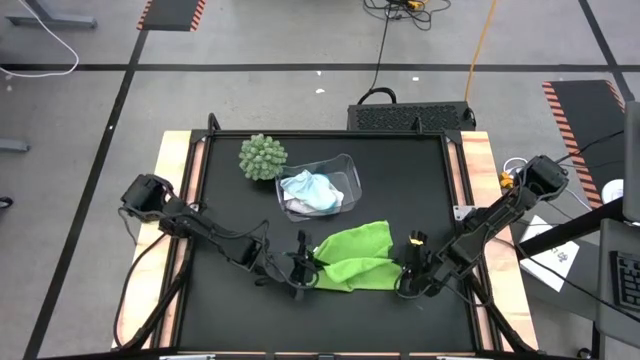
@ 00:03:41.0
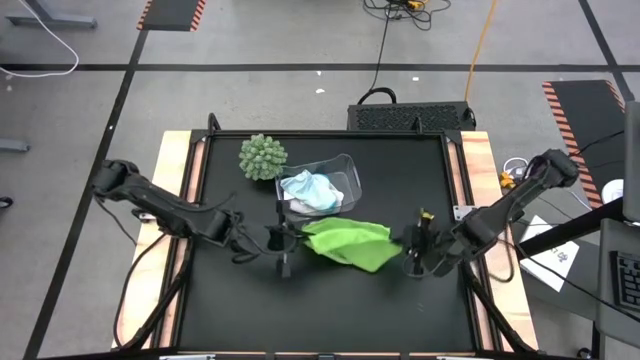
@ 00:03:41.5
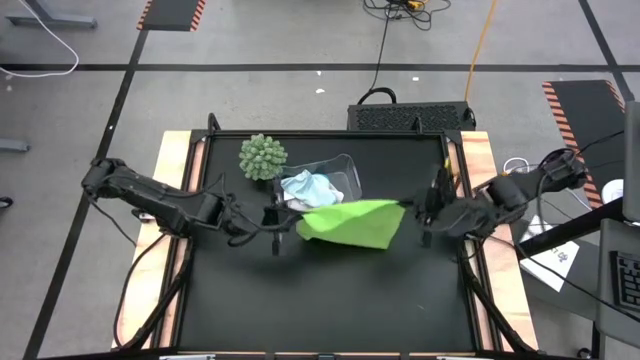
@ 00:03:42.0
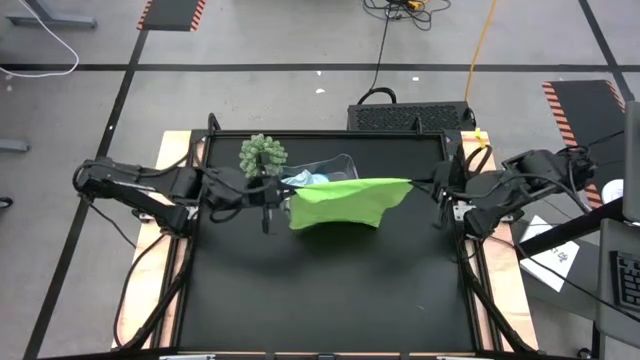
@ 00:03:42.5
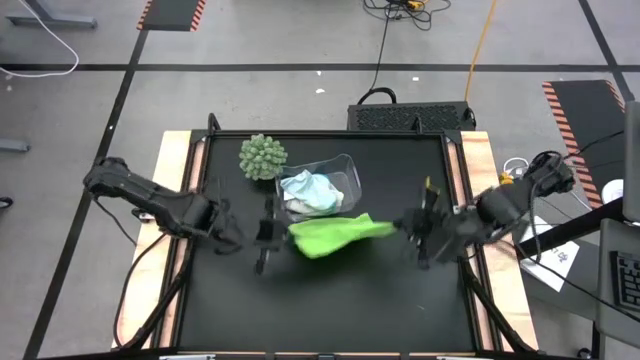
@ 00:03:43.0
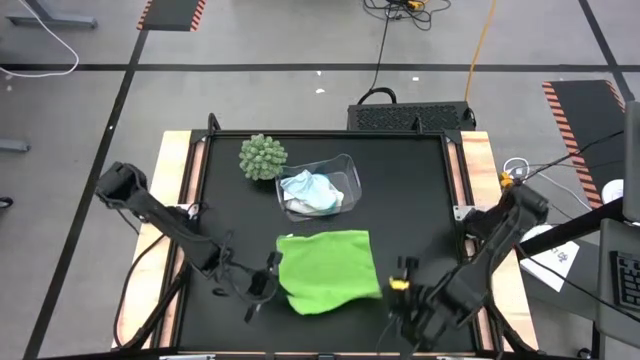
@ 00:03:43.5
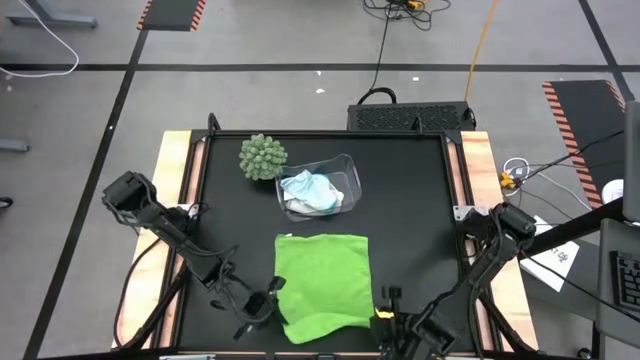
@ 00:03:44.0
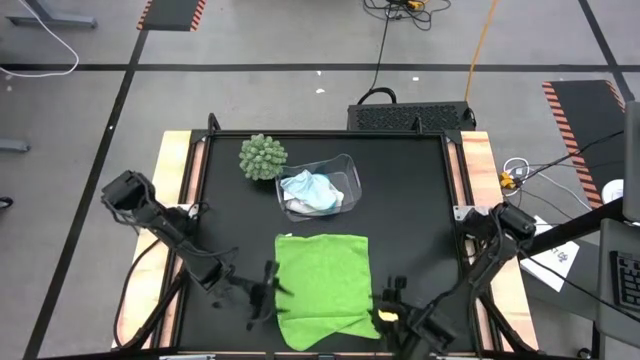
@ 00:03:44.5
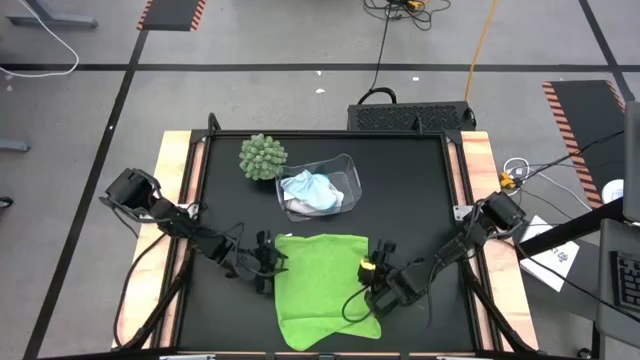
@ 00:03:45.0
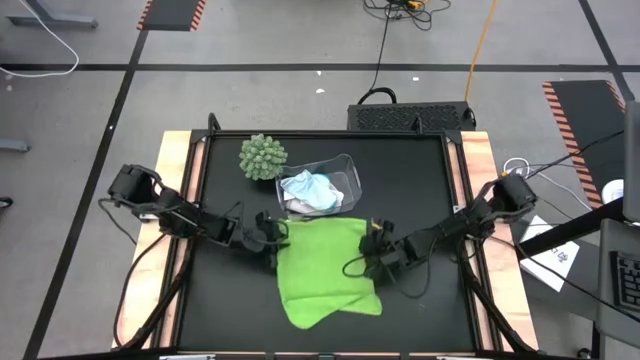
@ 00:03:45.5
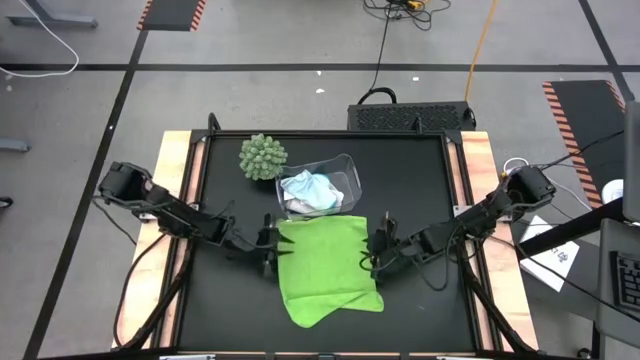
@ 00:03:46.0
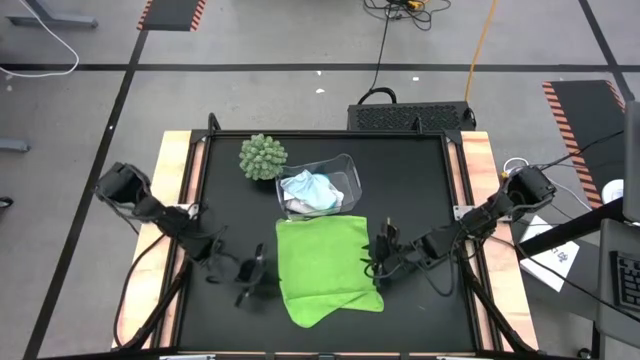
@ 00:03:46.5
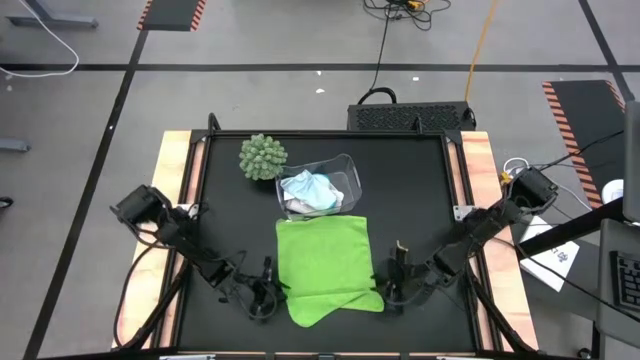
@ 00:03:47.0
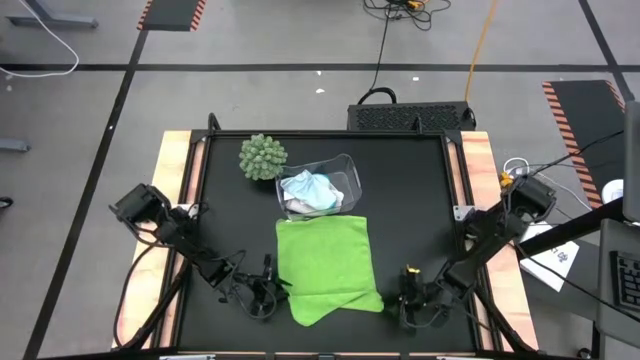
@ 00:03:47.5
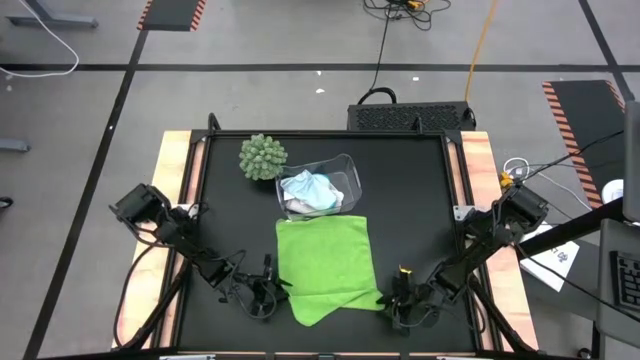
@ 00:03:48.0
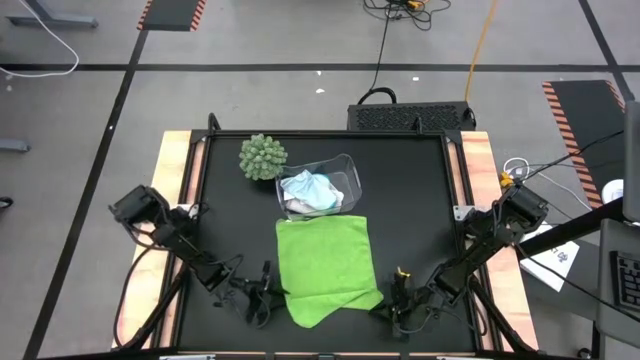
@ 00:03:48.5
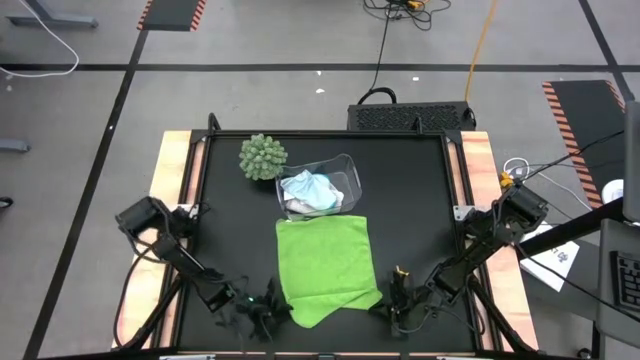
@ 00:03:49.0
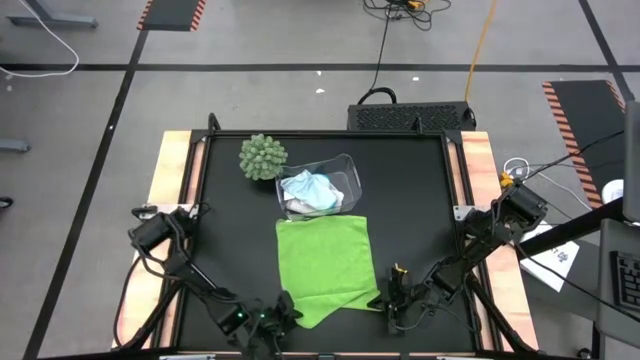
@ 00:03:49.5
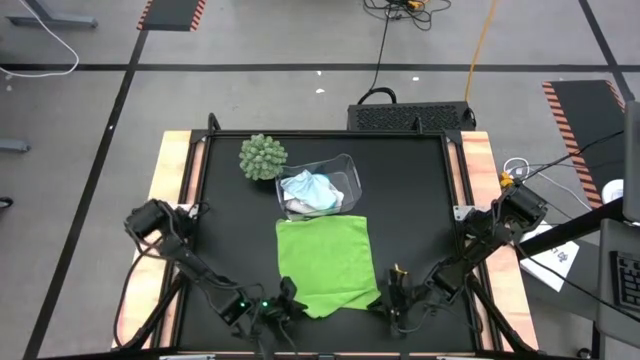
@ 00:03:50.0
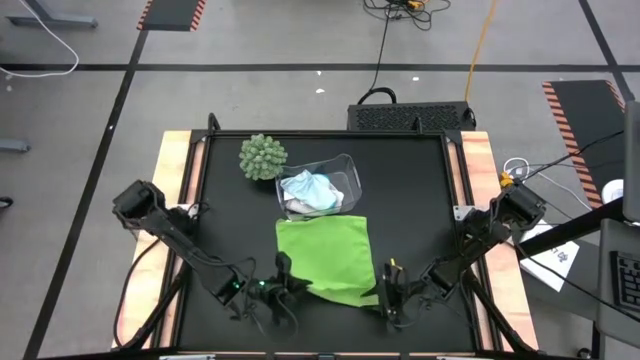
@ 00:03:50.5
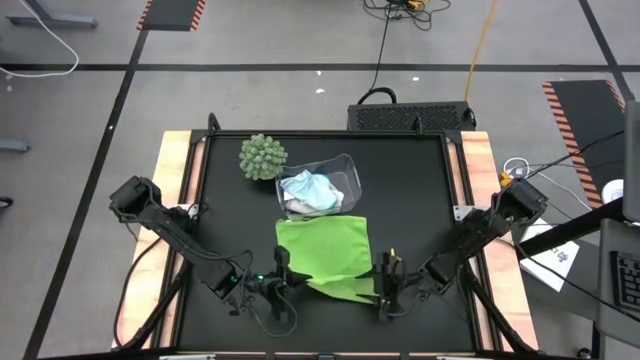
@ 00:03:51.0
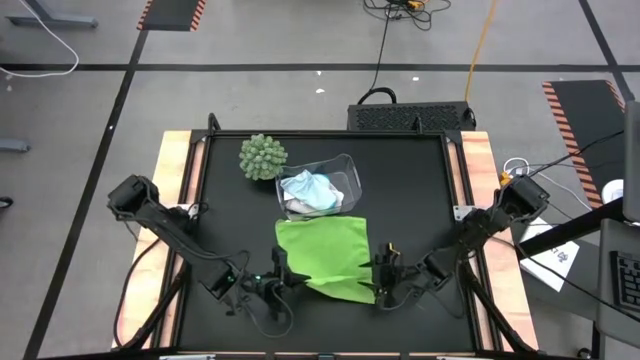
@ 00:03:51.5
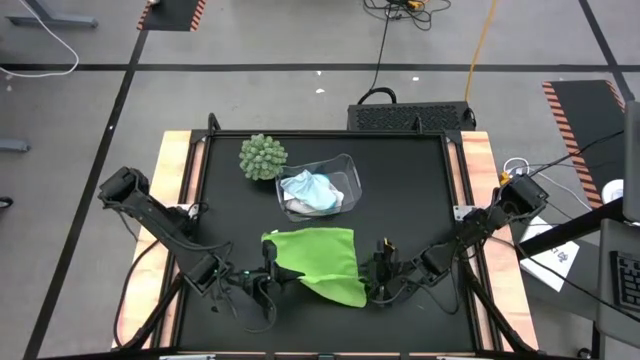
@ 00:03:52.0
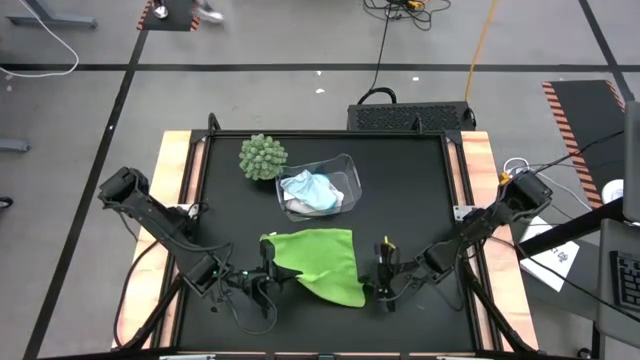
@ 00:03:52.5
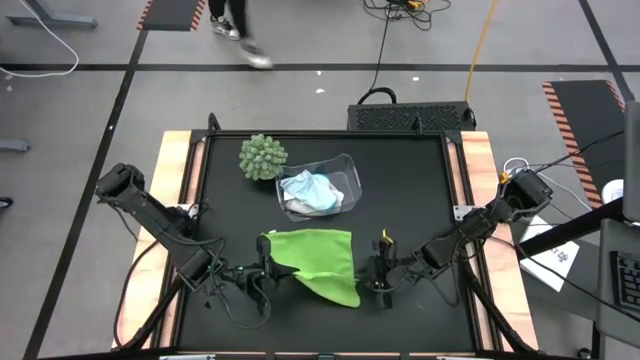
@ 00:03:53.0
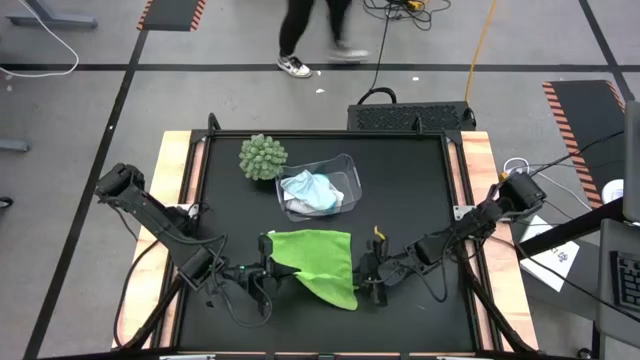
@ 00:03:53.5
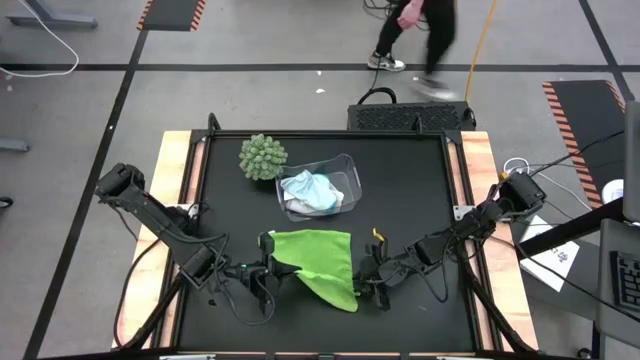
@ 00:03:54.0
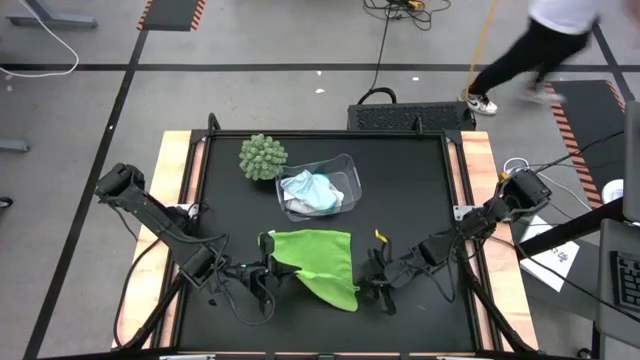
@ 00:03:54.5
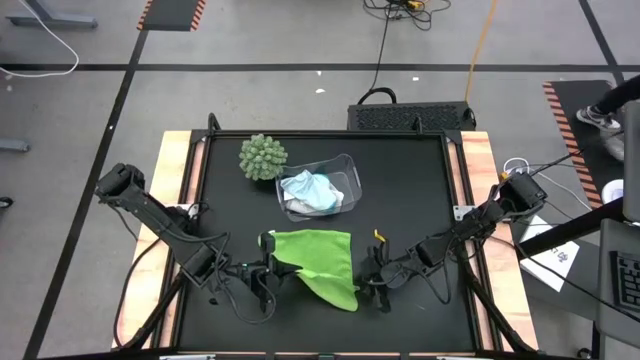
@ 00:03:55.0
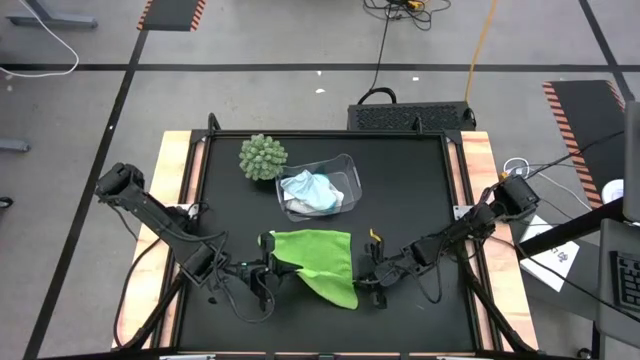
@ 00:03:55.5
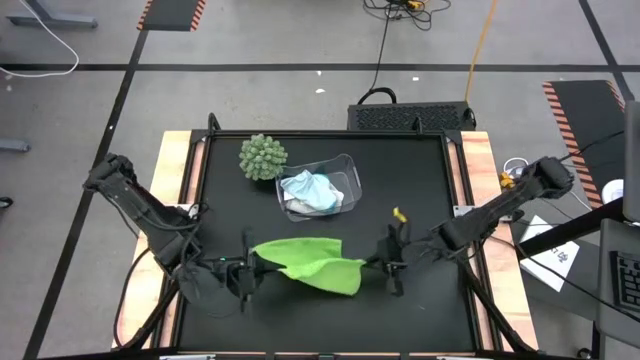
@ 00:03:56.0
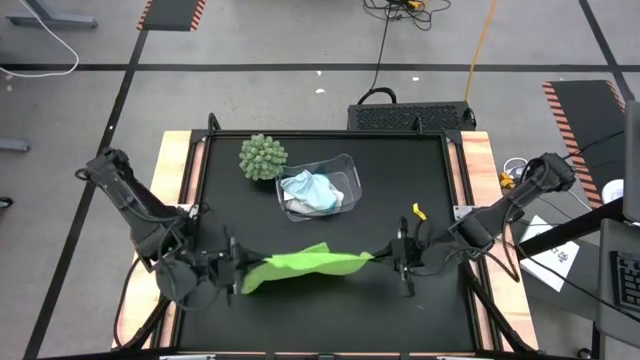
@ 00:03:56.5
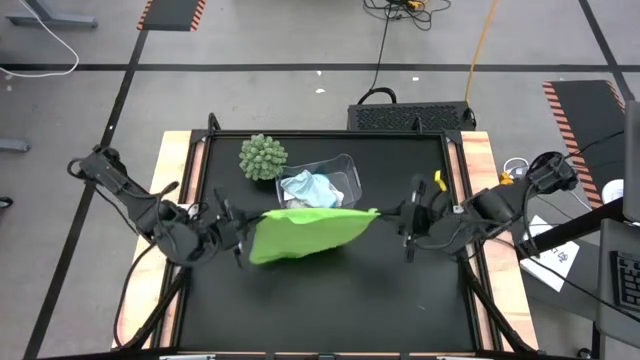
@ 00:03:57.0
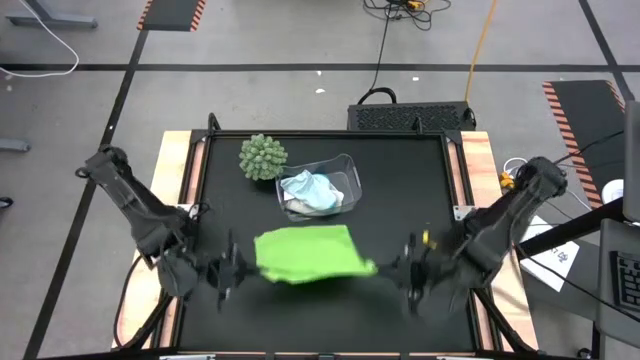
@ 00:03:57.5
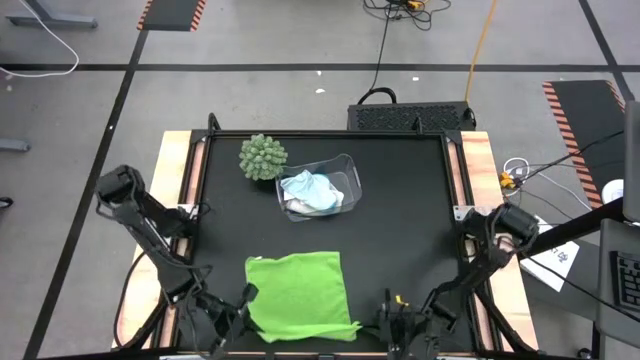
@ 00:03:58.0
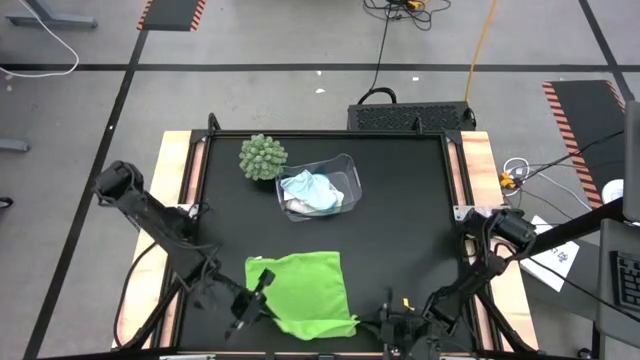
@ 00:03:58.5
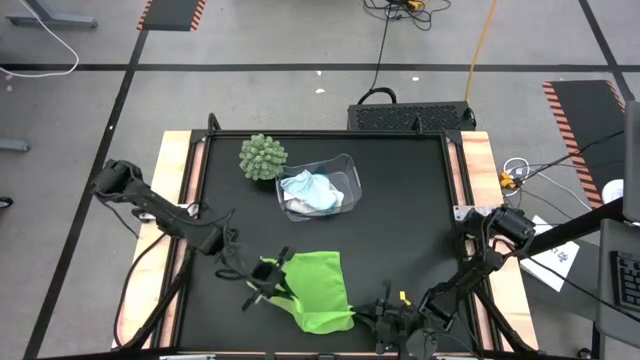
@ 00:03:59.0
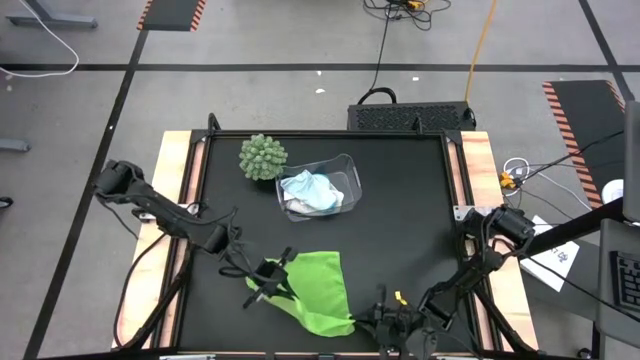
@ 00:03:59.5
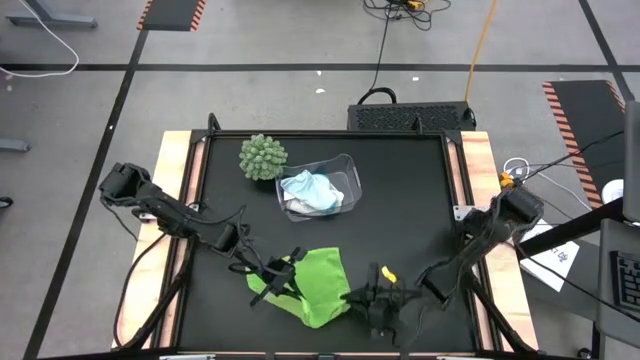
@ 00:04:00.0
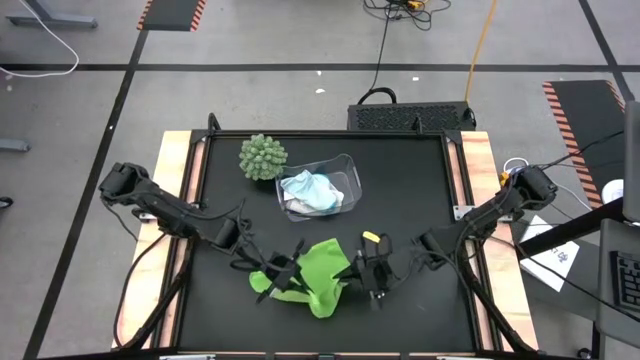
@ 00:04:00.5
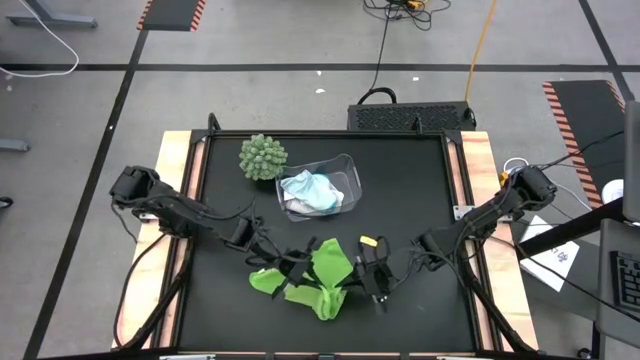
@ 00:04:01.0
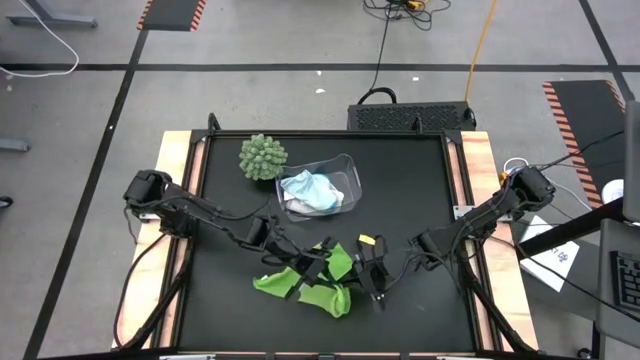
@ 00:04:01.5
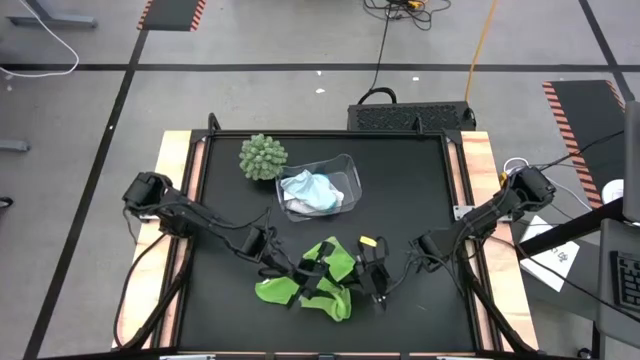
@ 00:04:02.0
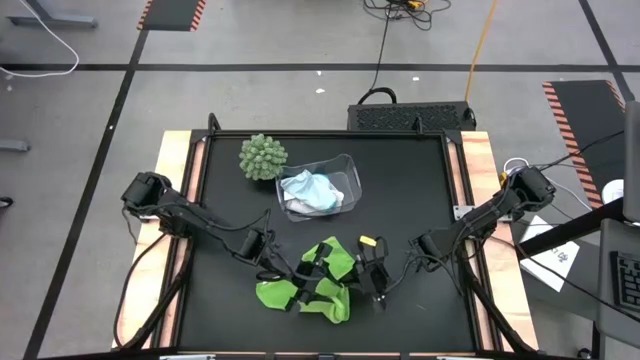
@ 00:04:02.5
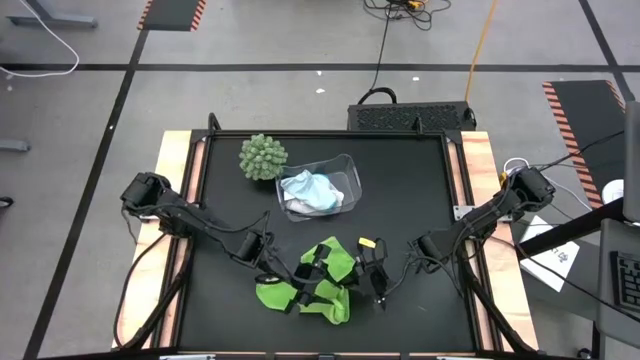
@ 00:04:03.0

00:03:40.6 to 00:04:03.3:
Task: Fold microfiber towels
Fold the green towel
